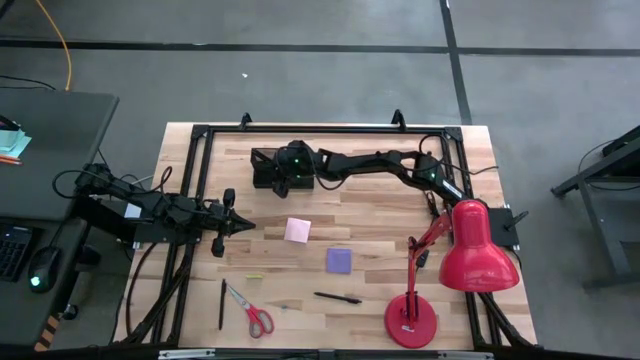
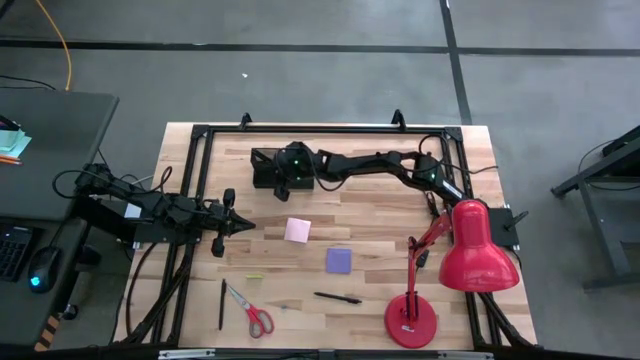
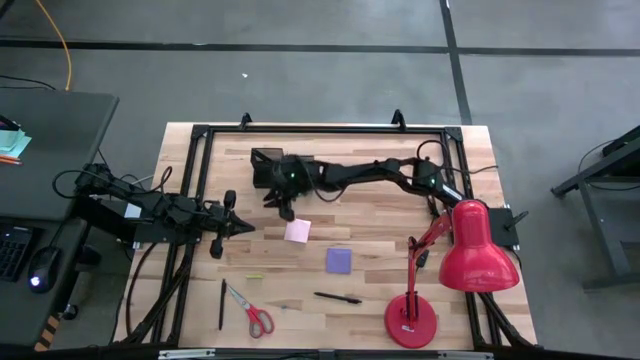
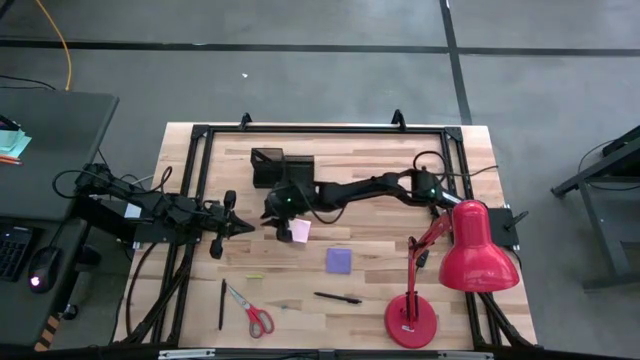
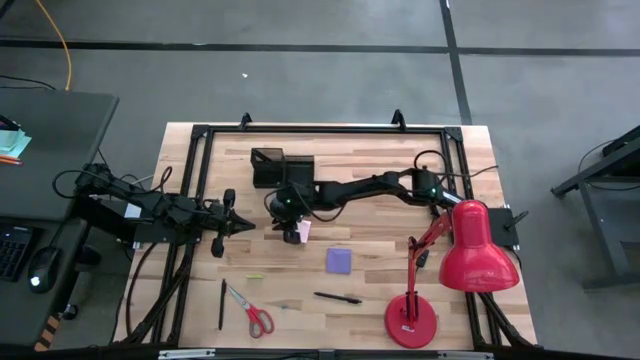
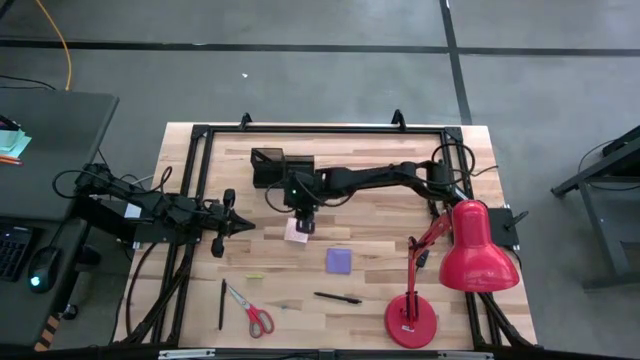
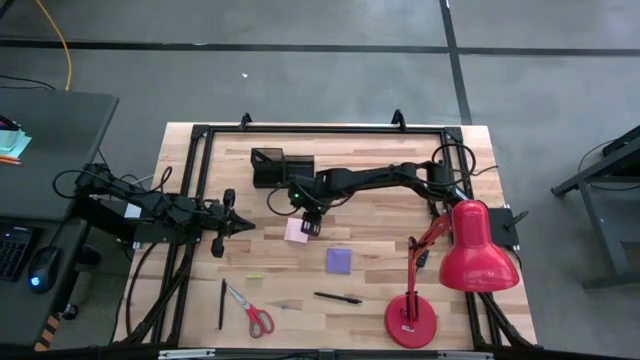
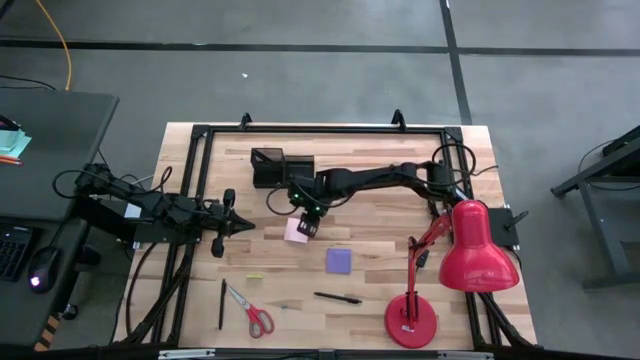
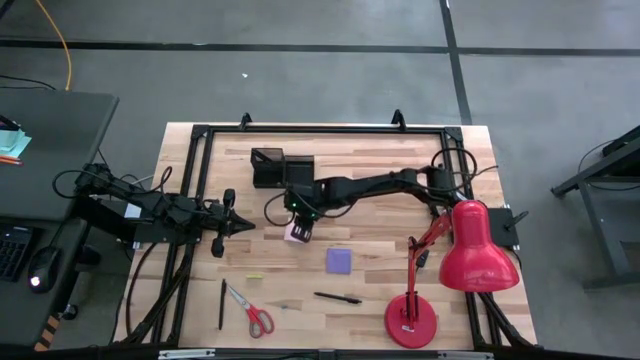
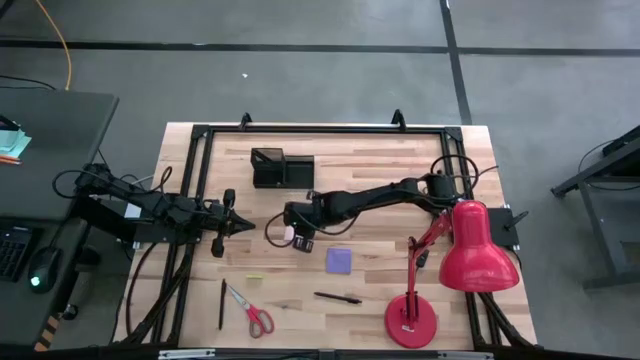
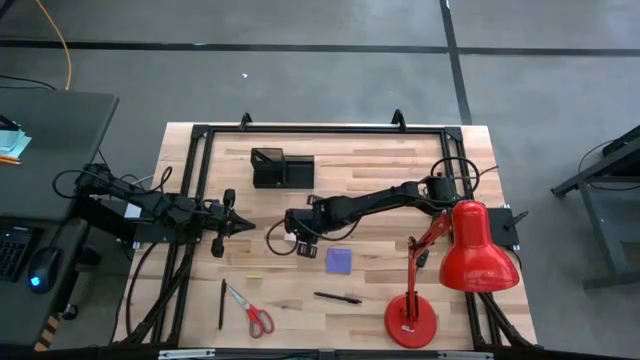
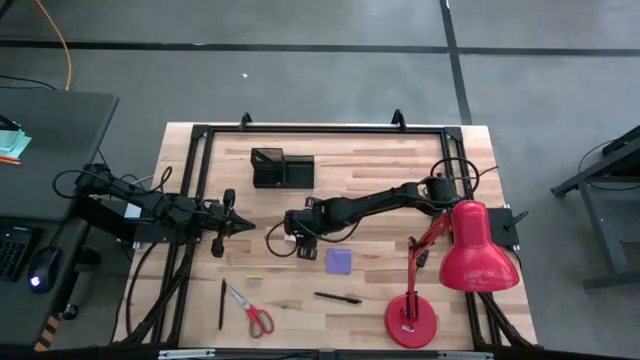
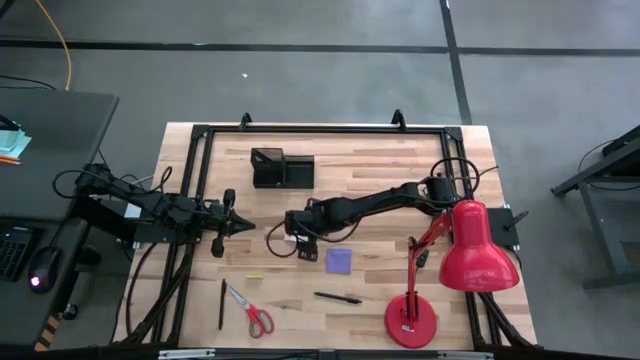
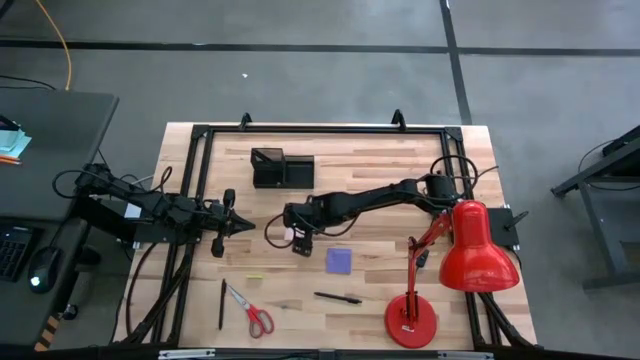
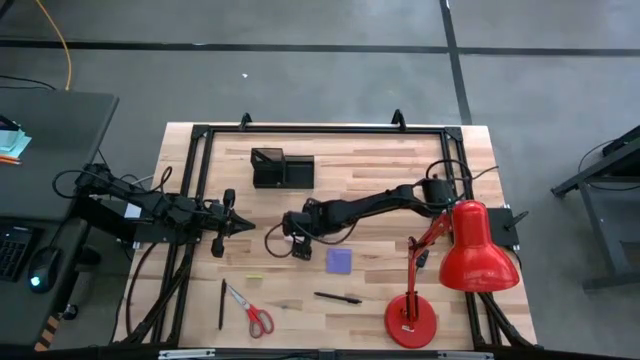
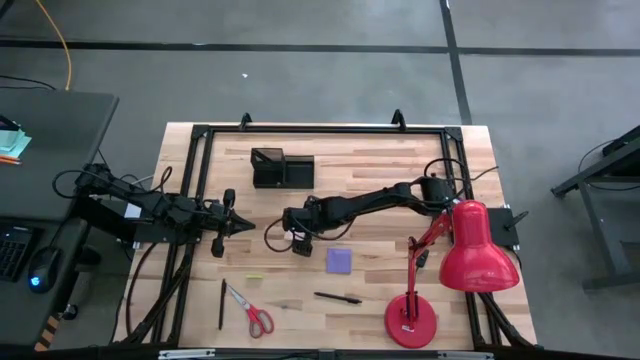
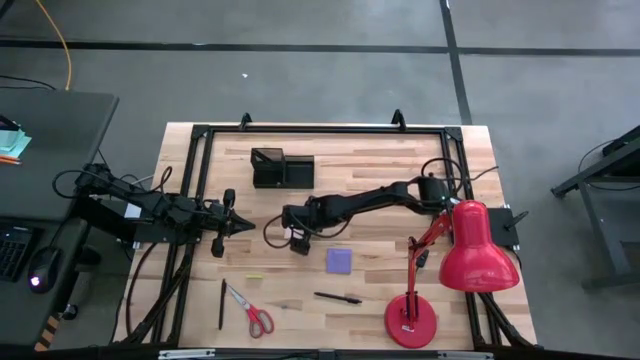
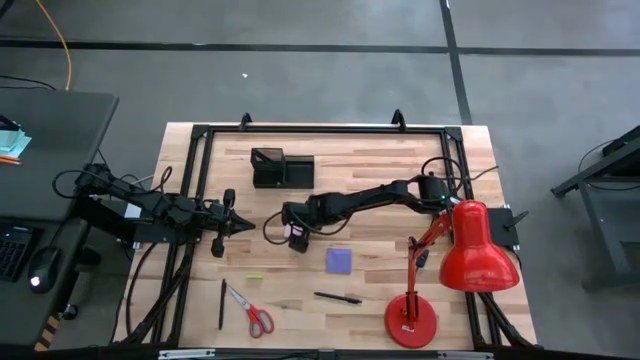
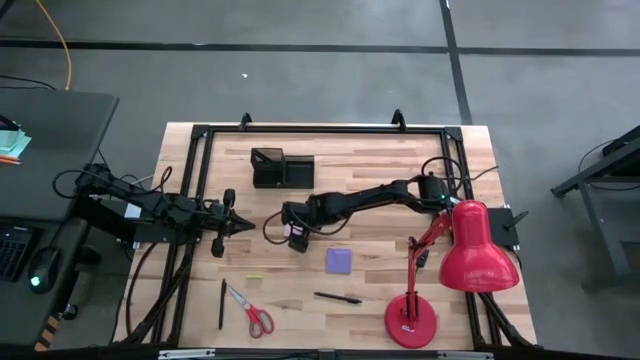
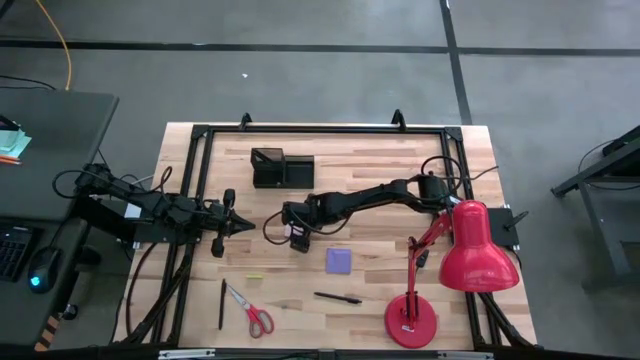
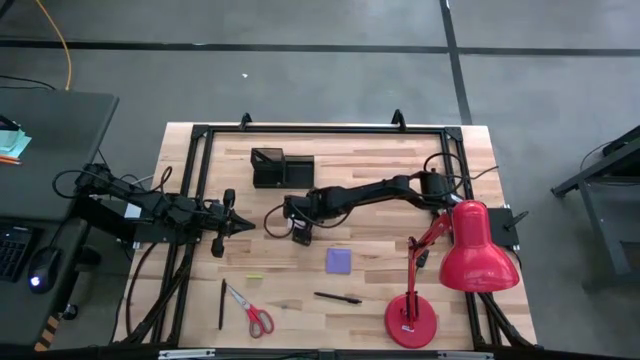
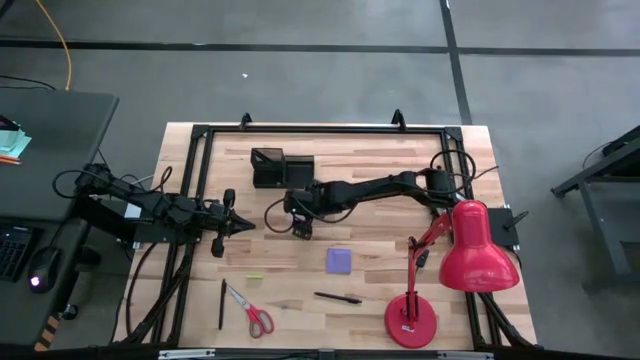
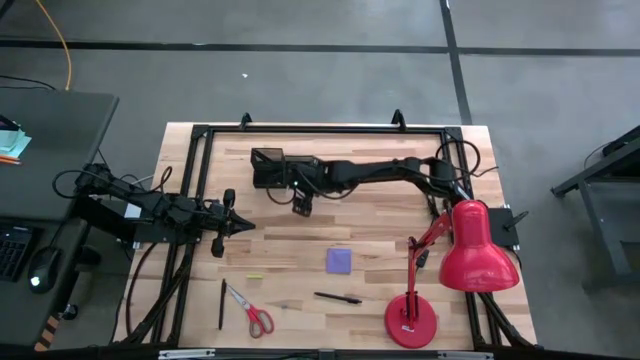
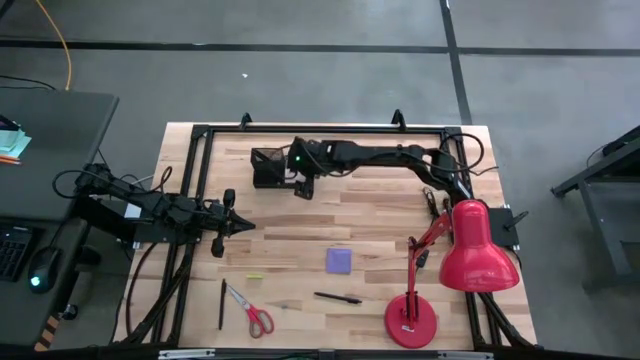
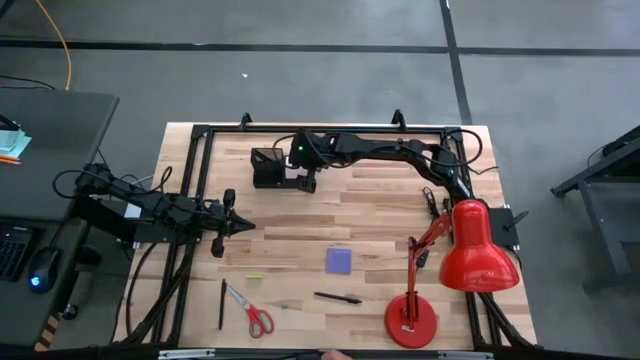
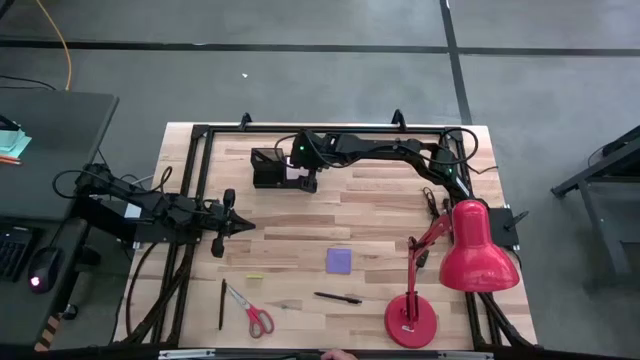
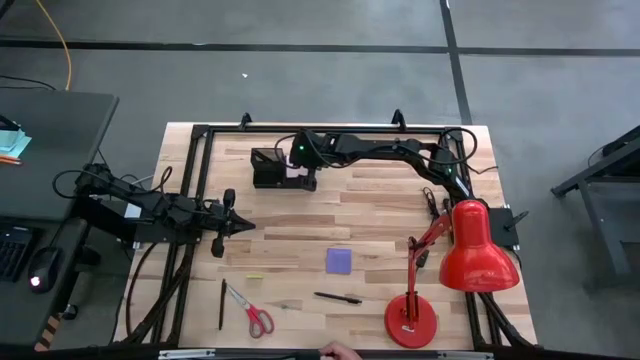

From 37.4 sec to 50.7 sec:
Task: Pick and place office supplies into organizer
Put the pink sticky notes into the black desk organizer

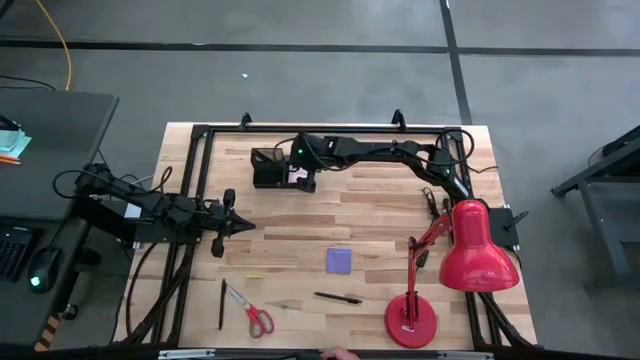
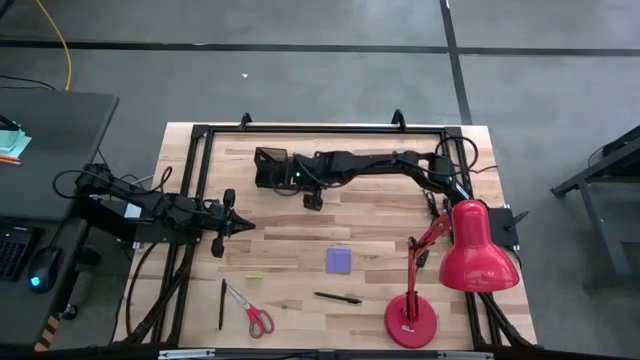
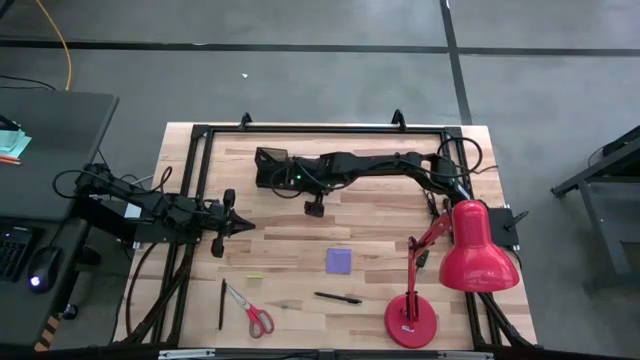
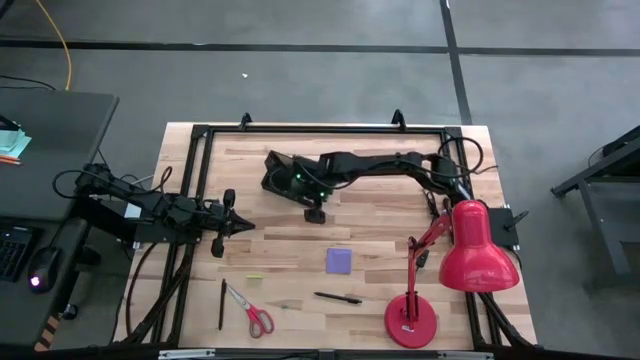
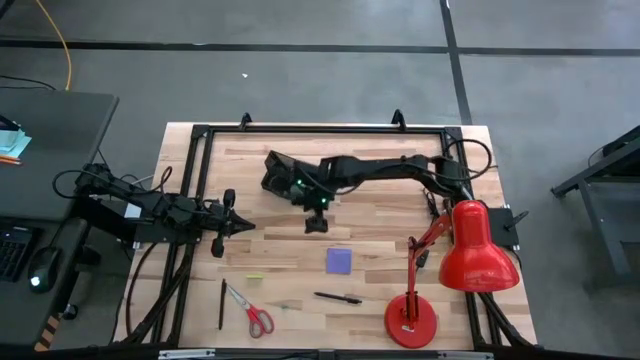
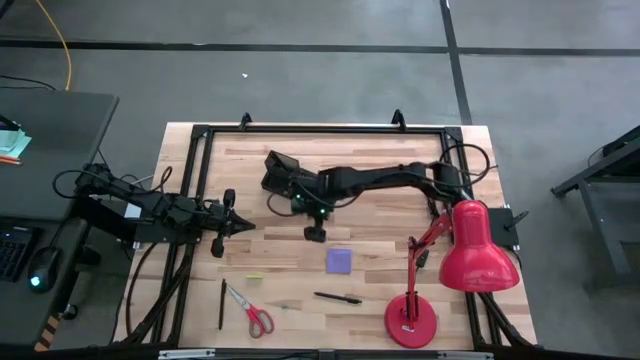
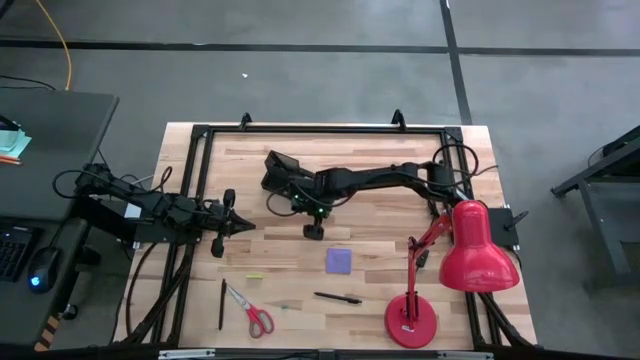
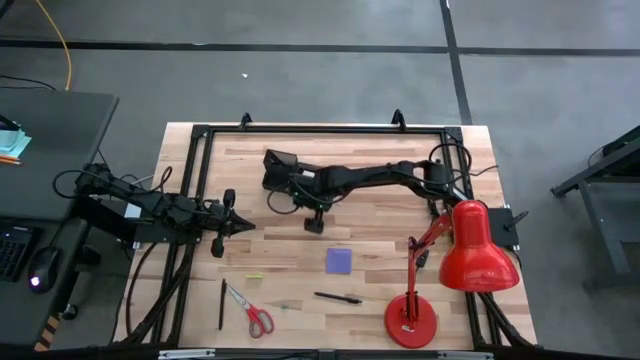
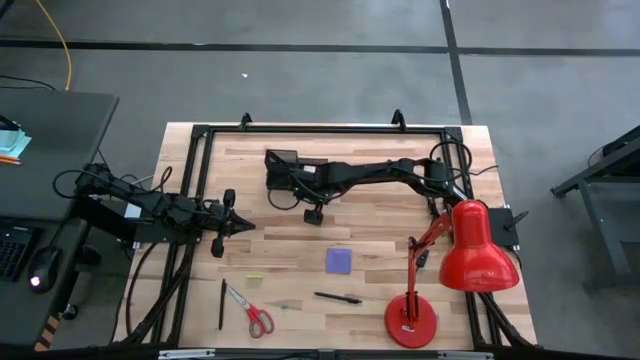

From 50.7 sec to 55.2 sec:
Adjust the black desk organizer

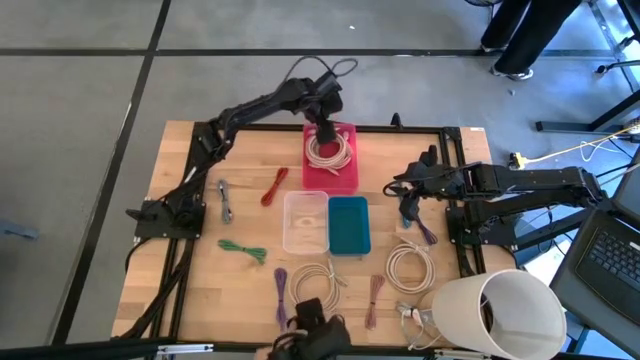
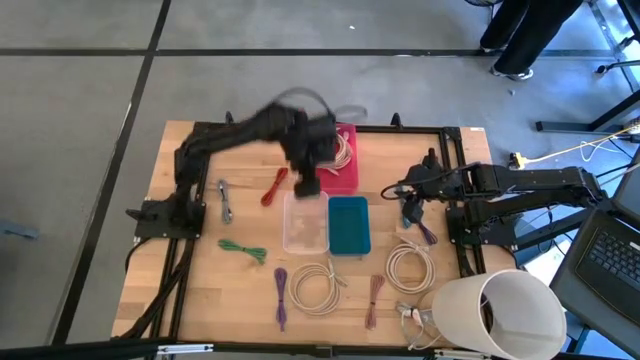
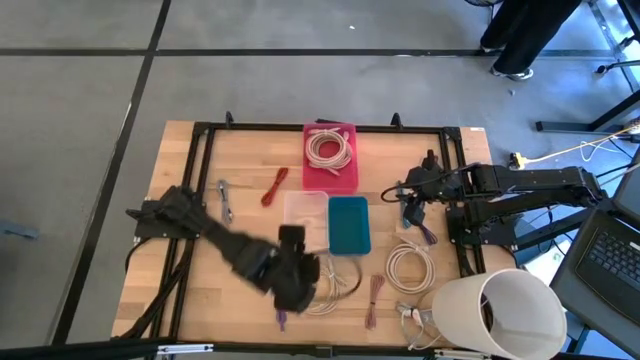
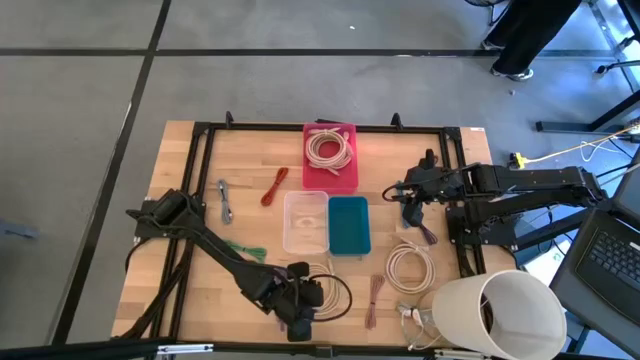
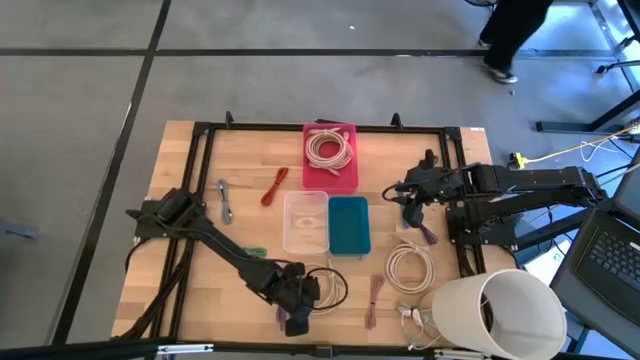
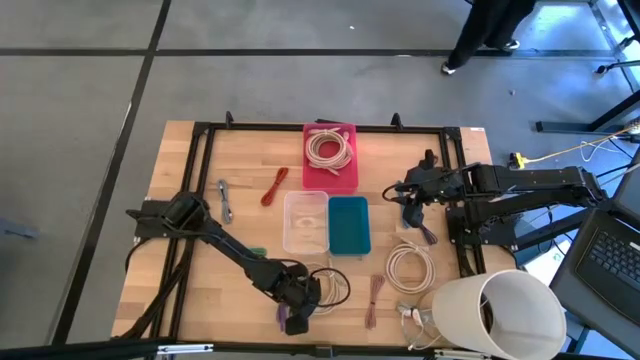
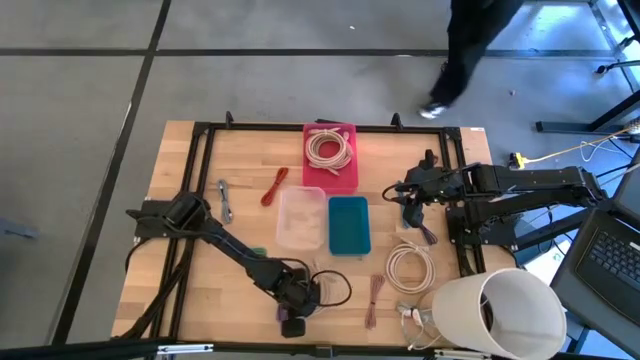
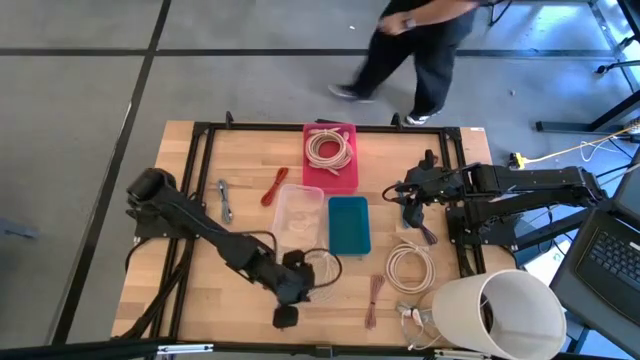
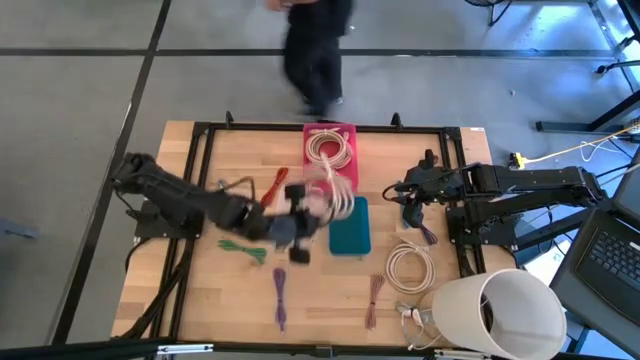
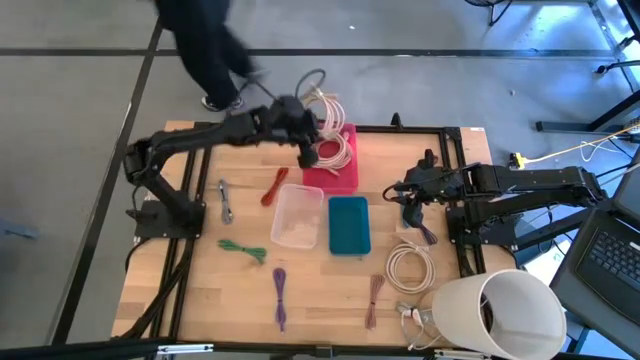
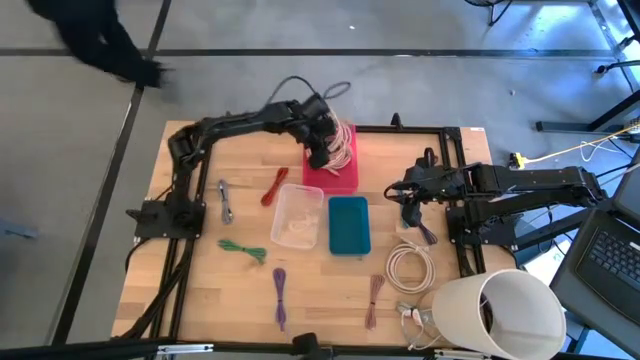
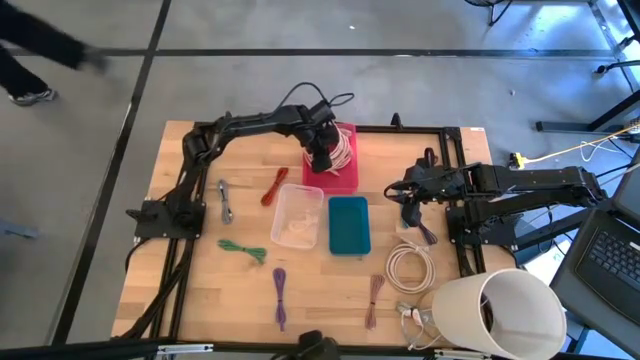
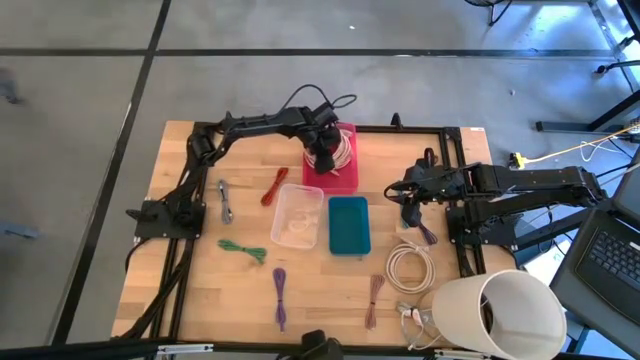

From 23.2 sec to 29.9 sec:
Task: Pick & Place USB Port
Put the brown HDMI cable into the pink bin
